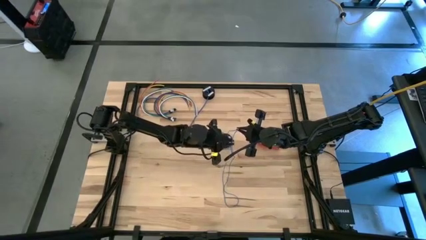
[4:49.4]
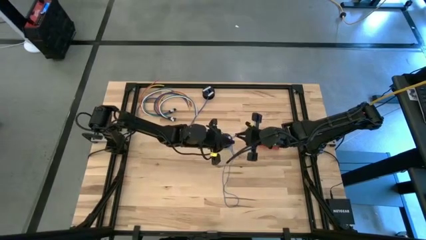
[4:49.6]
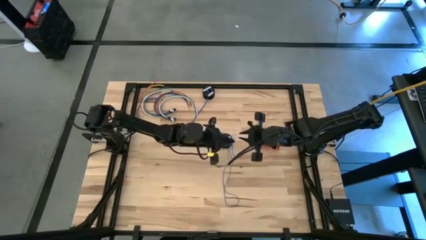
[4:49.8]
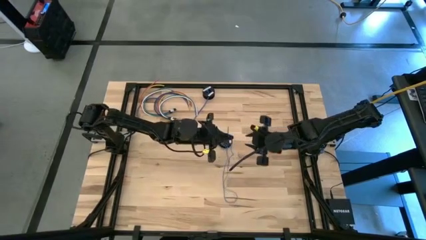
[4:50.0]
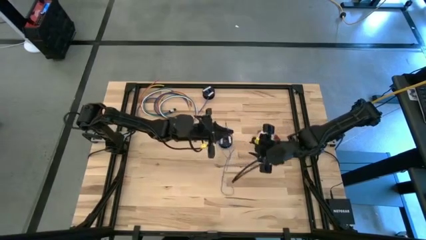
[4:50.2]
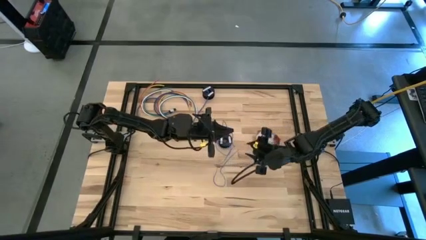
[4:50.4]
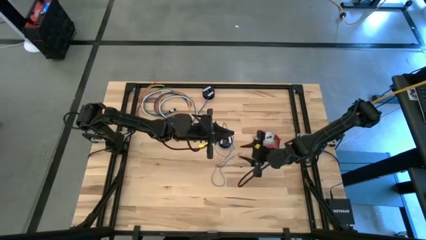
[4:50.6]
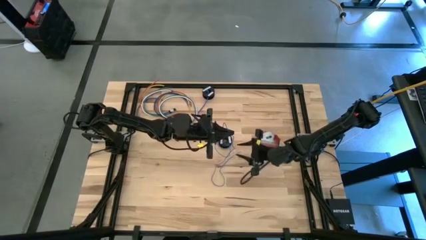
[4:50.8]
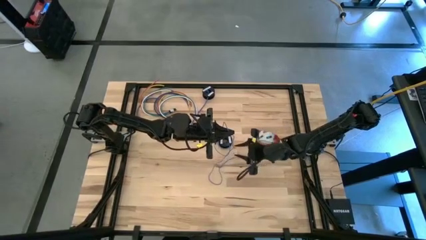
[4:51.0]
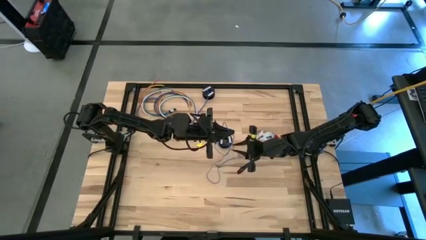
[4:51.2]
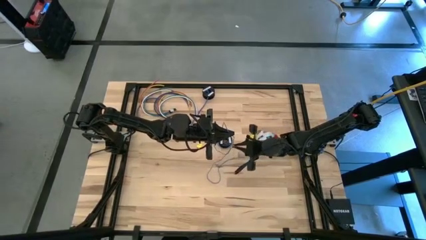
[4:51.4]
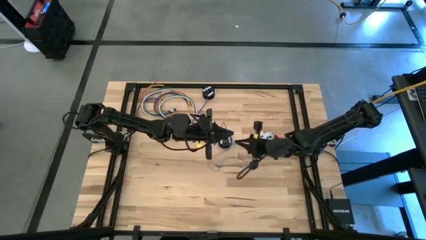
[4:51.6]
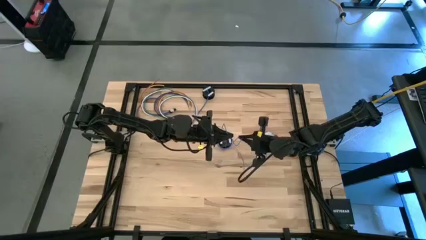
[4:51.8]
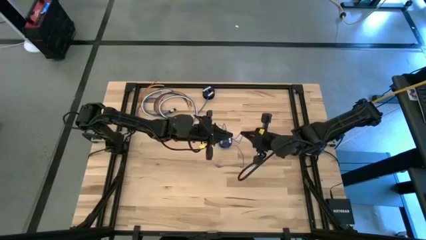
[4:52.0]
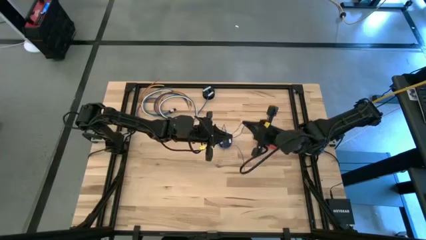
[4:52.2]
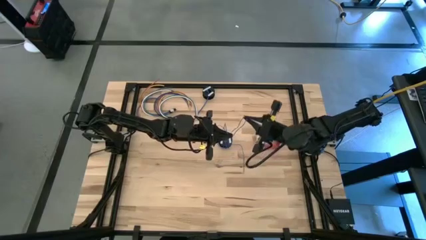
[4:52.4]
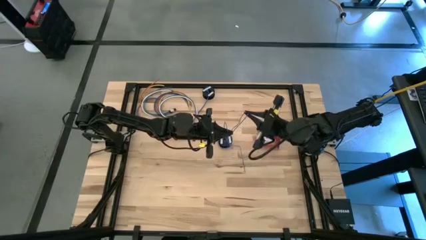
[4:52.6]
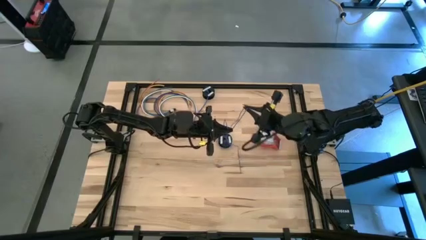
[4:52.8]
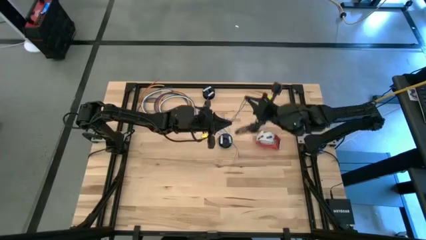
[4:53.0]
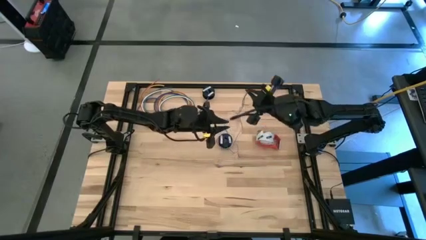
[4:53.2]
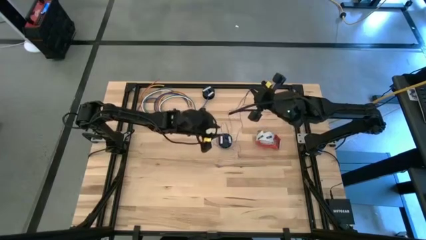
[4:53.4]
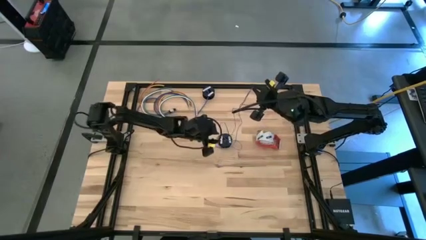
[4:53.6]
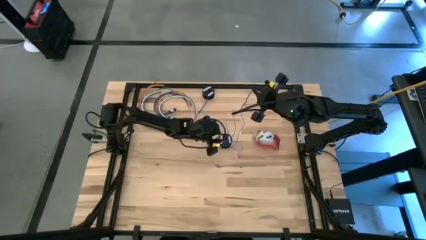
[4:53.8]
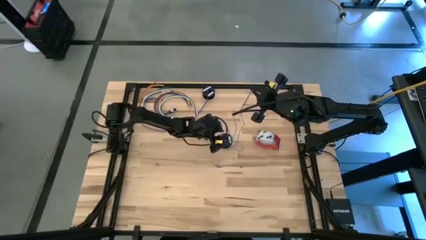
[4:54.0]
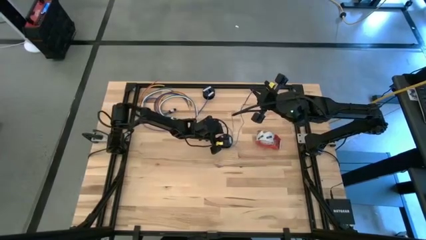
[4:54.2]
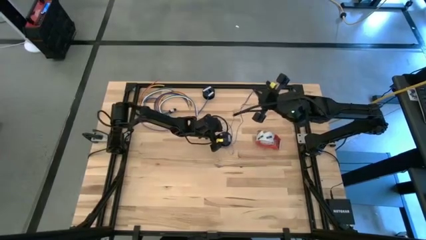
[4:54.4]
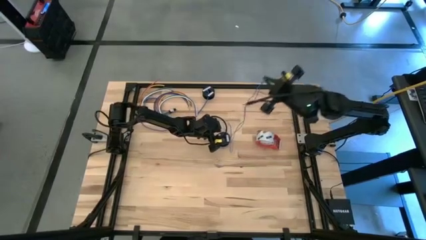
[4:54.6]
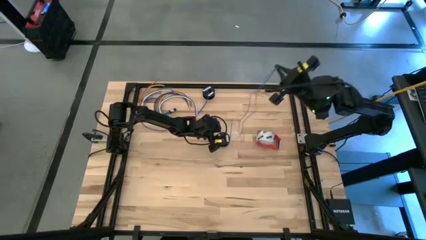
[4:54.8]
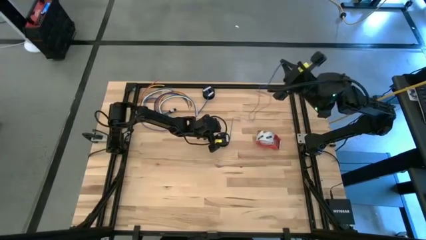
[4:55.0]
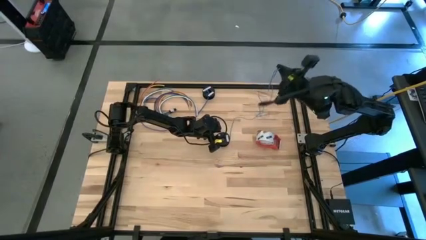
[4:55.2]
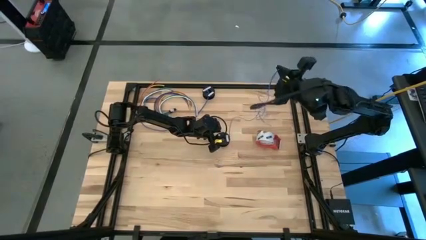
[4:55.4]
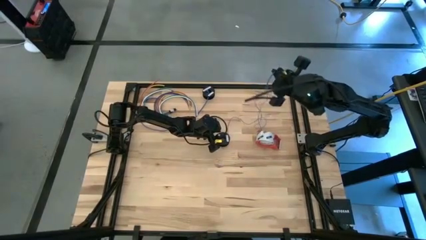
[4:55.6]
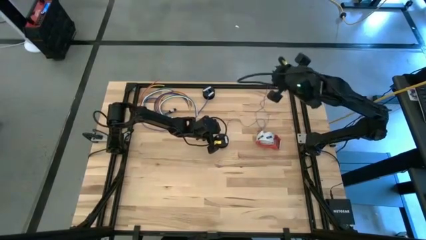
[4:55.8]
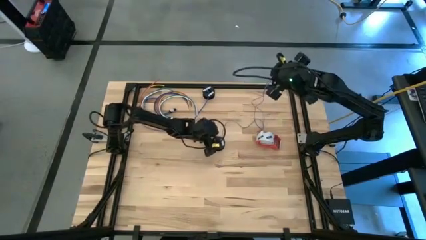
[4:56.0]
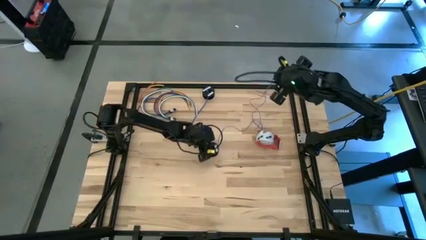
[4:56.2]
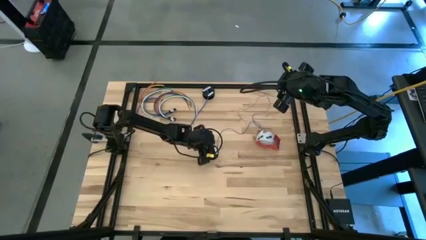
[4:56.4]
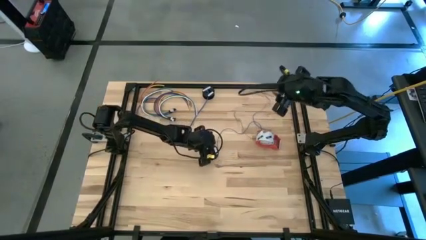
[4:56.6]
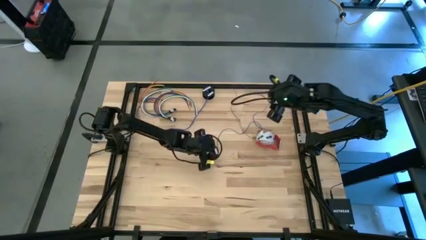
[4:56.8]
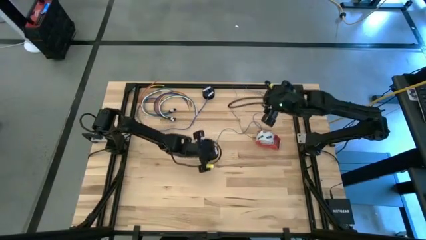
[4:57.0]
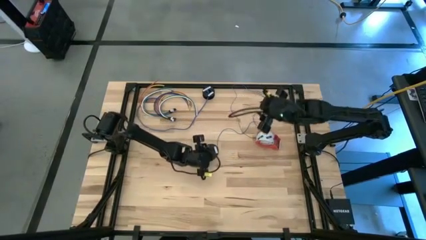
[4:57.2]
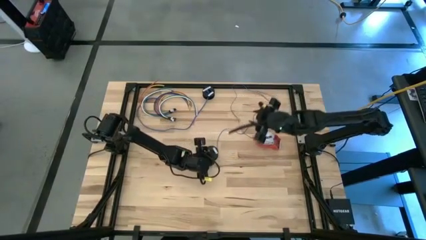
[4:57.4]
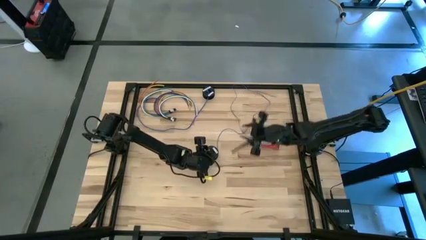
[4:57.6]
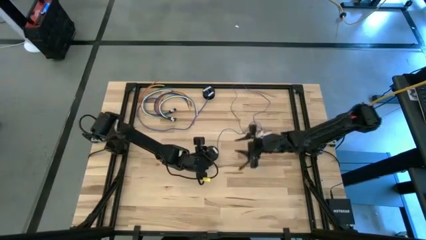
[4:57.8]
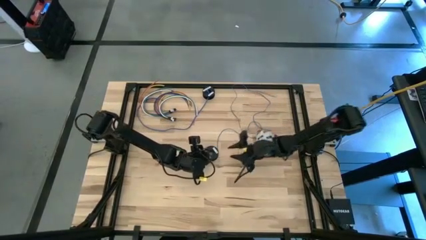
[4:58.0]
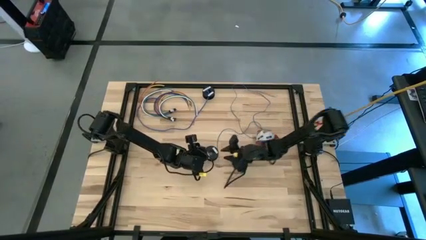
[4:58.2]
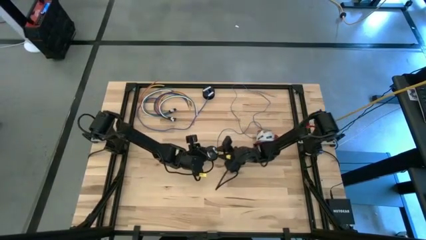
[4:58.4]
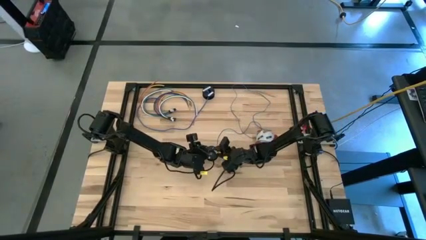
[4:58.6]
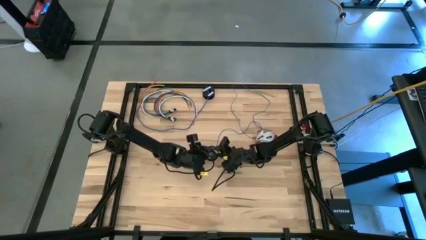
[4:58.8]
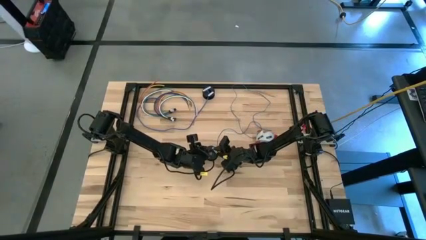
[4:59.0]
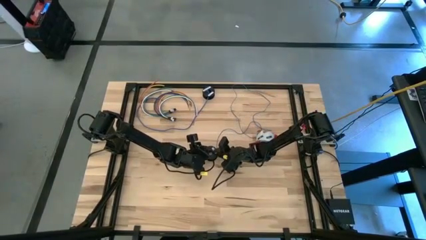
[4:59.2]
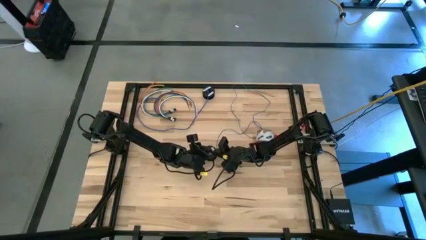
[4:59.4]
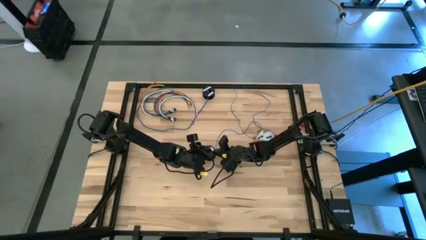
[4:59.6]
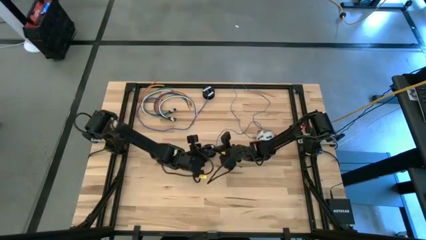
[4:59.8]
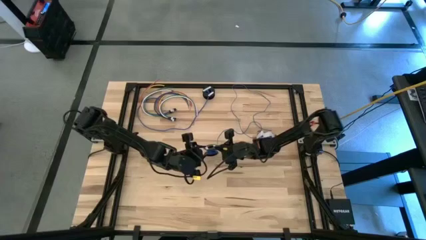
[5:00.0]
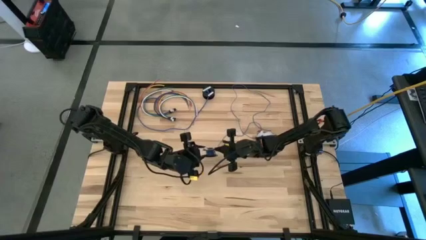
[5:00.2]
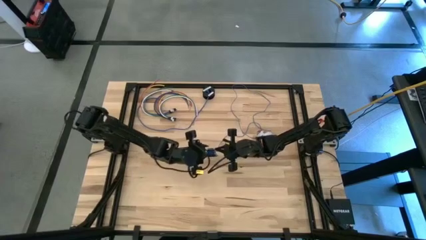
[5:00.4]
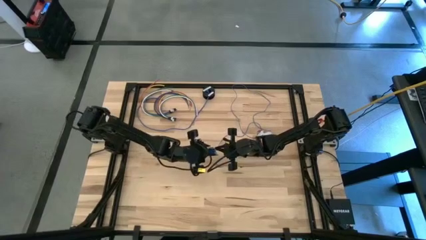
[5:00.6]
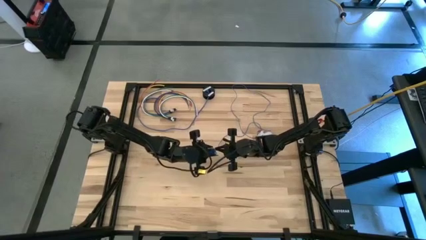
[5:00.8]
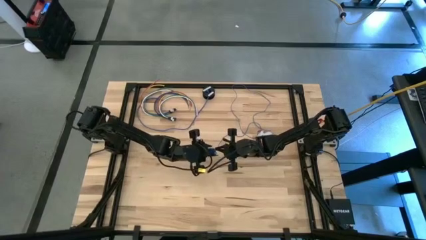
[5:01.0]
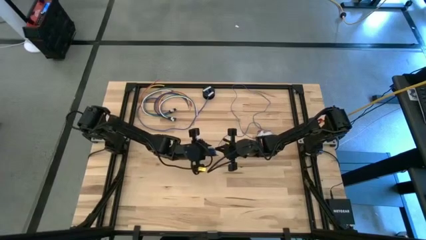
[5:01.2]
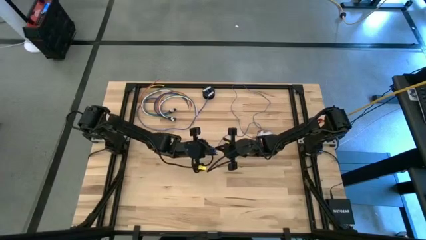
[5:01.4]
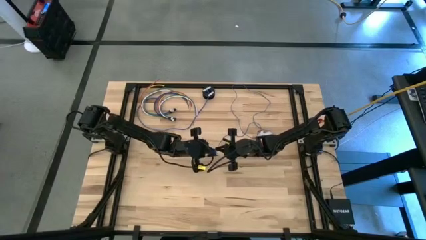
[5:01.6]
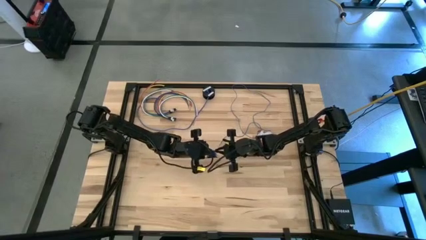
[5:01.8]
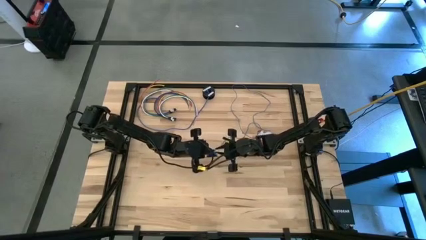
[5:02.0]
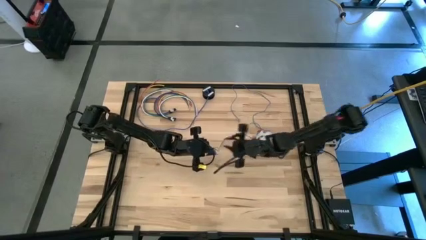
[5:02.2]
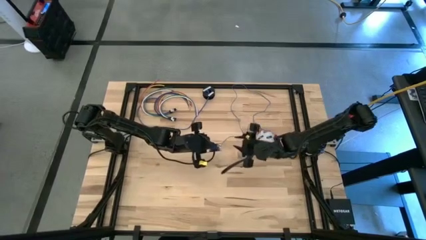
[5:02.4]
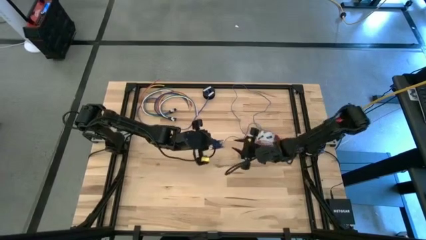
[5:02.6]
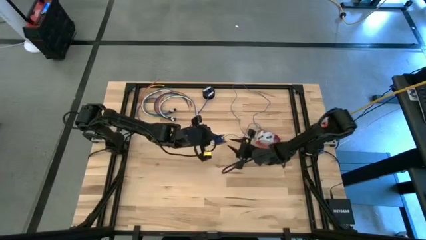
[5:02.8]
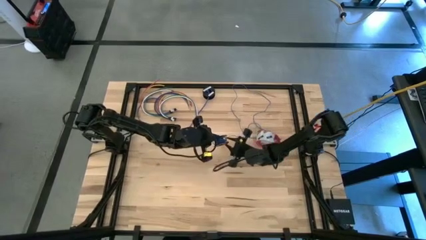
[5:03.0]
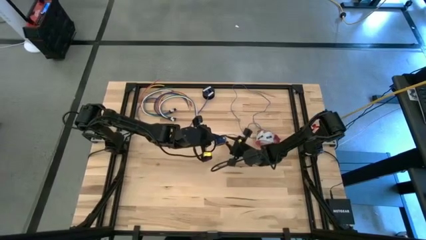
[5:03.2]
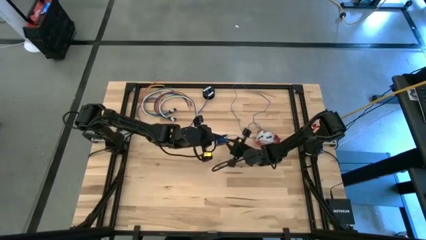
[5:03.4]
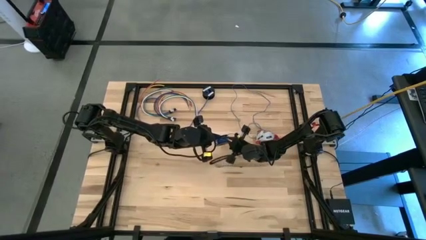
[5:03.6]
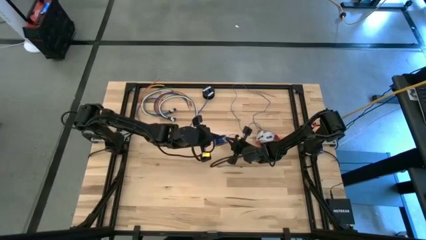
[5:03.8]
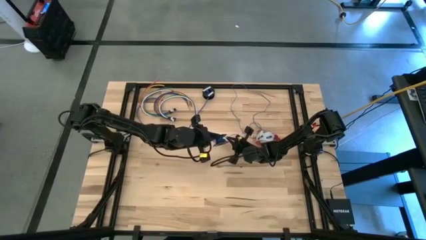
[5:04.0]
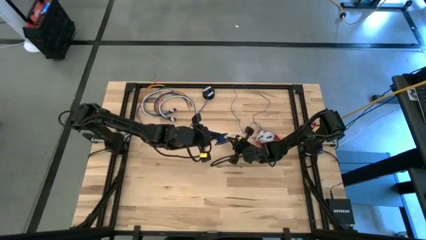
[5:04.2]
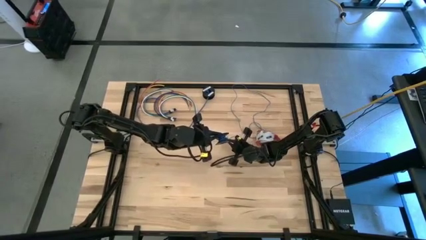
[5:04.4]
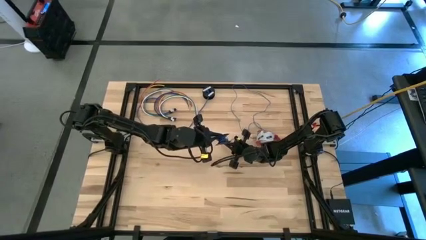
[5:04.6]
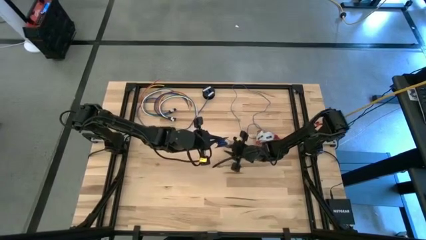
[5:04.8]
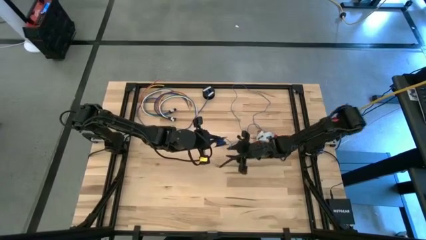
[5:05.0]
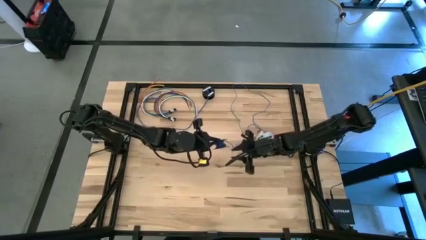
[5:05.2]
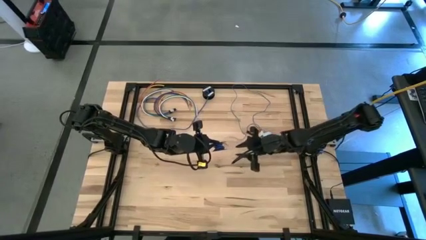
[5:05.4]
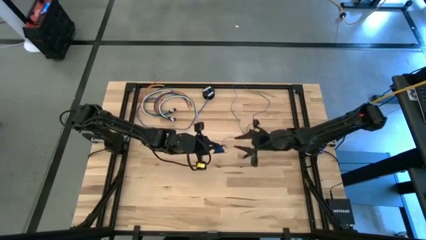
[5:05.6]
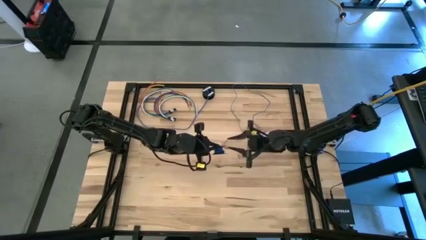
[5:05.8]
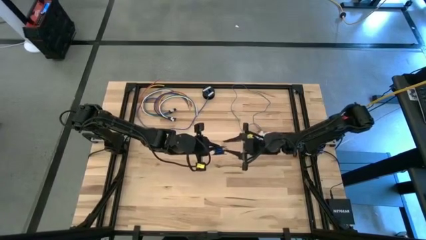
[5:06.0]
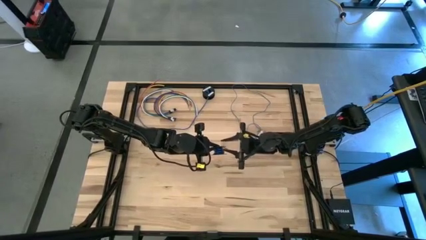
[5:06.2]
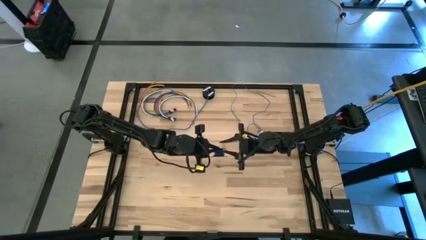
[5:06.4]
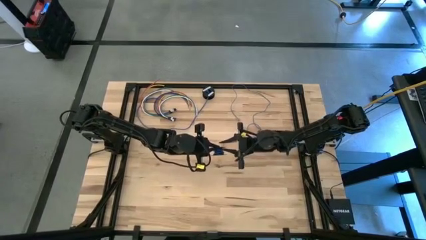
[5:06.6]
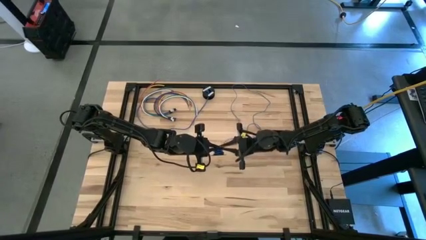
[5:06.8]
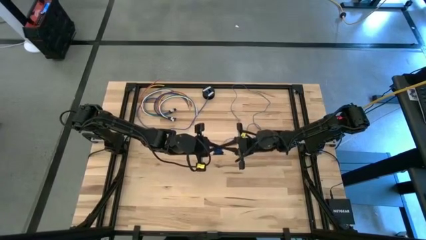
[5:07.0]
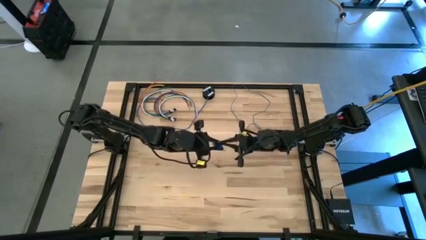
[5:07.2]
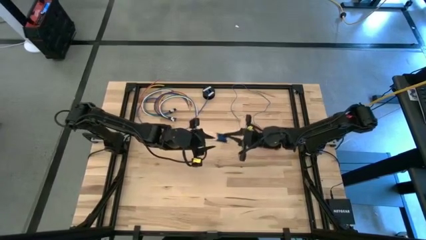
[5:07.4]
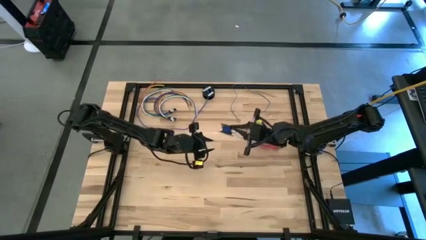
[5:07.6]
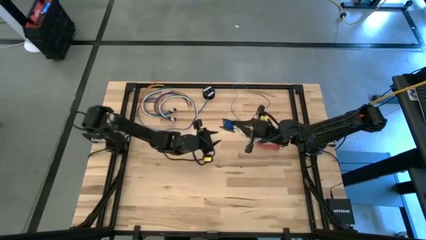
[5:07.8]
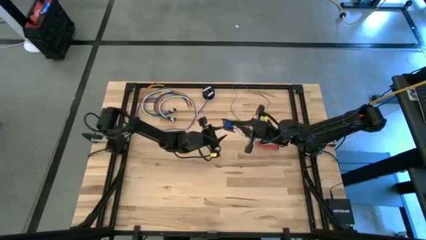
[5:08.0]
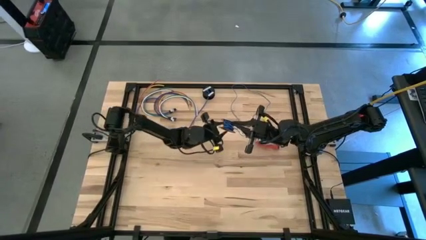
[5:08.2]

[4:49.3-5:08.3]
Task: Coil cords
Coil the blue wire onto the spool
